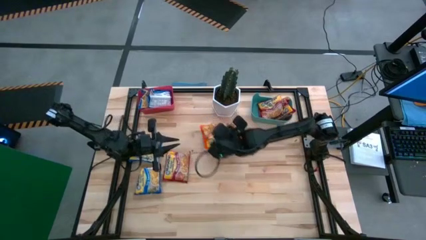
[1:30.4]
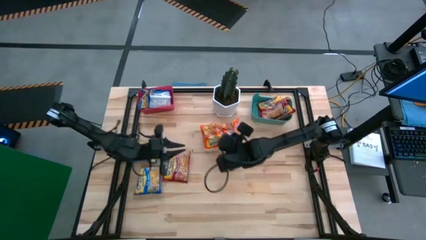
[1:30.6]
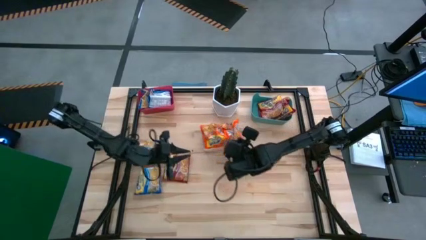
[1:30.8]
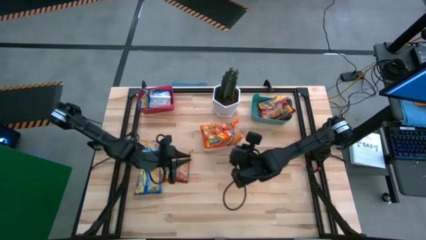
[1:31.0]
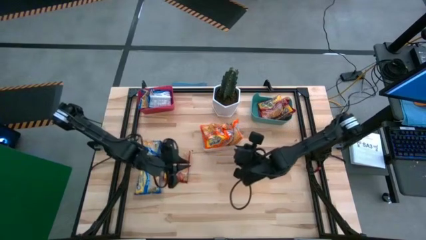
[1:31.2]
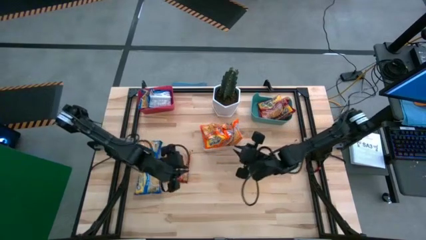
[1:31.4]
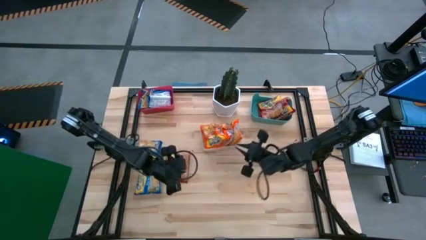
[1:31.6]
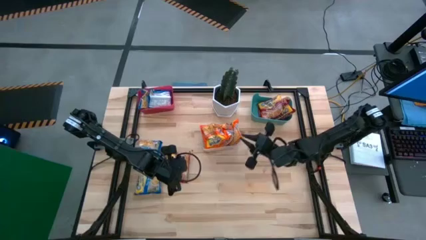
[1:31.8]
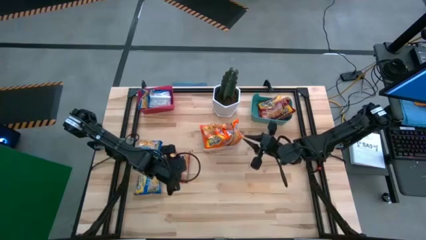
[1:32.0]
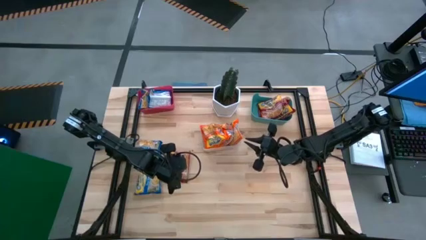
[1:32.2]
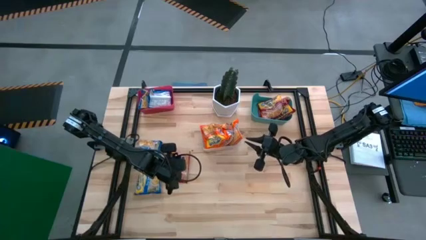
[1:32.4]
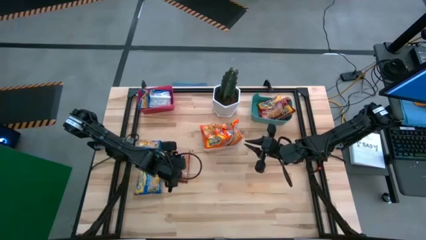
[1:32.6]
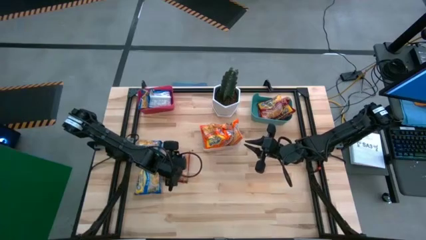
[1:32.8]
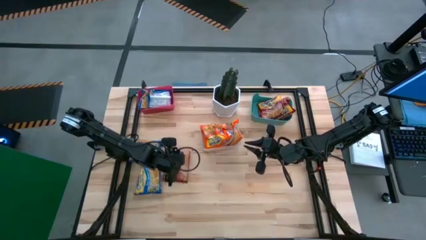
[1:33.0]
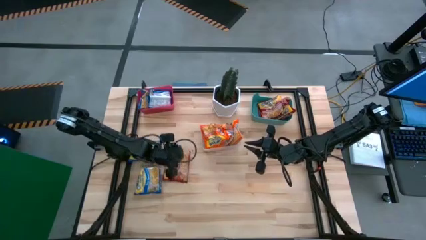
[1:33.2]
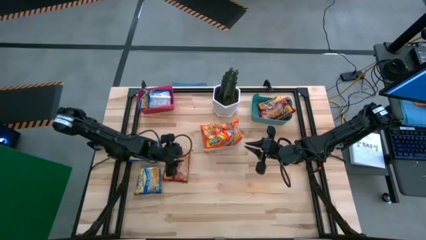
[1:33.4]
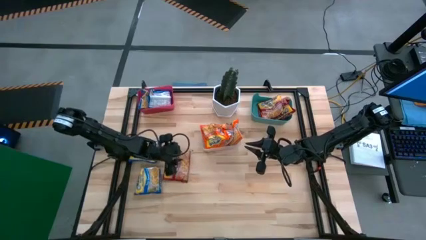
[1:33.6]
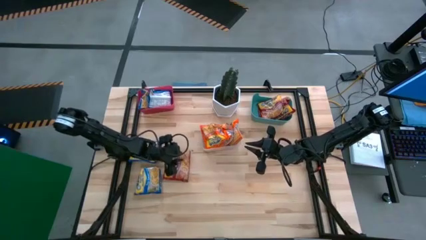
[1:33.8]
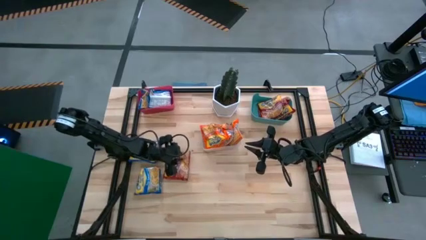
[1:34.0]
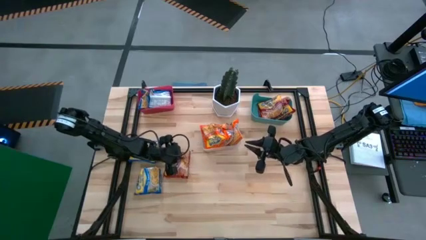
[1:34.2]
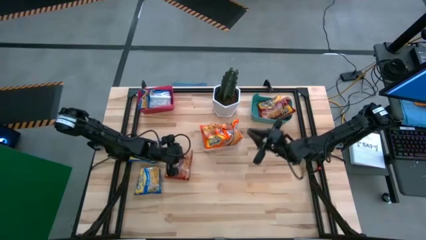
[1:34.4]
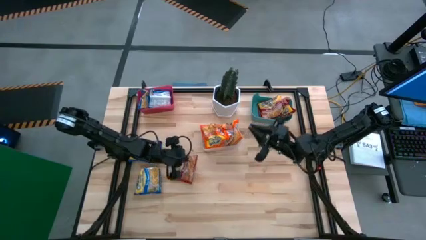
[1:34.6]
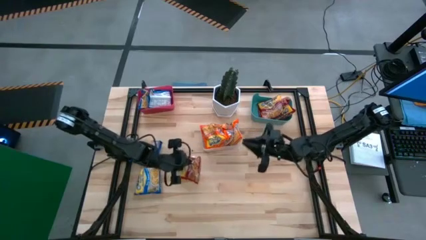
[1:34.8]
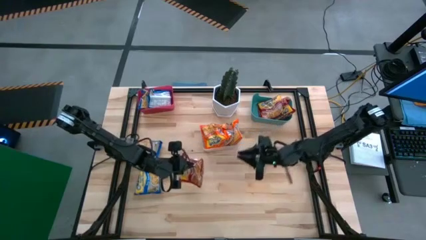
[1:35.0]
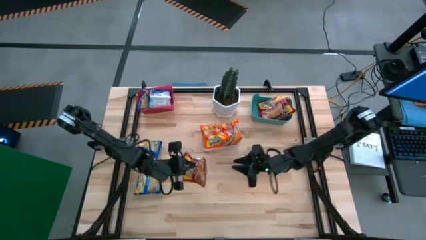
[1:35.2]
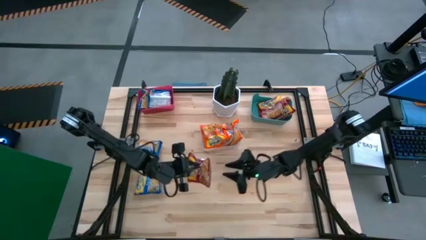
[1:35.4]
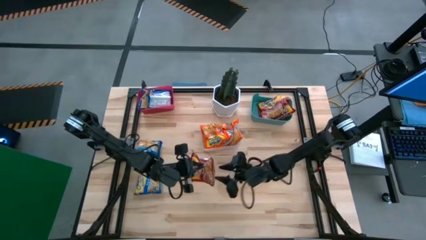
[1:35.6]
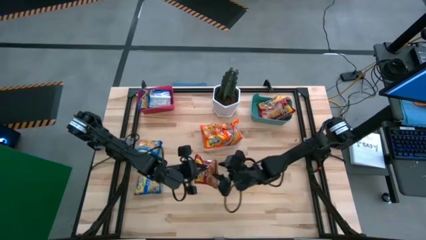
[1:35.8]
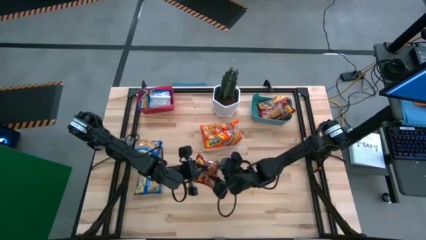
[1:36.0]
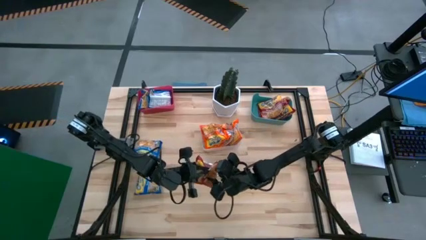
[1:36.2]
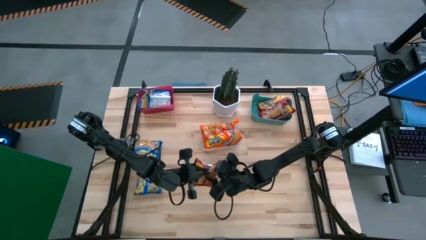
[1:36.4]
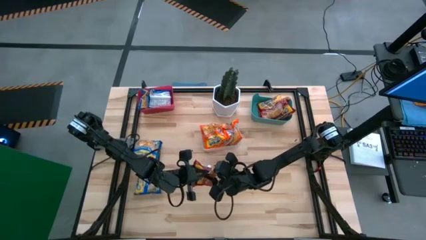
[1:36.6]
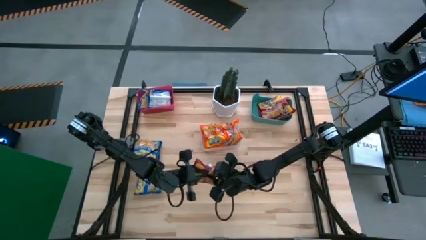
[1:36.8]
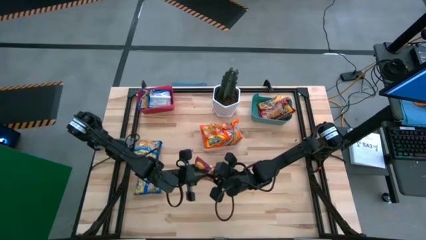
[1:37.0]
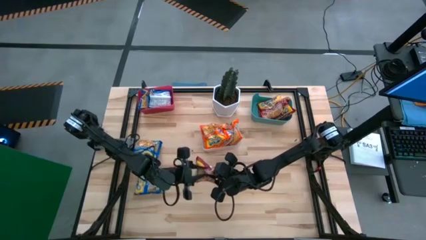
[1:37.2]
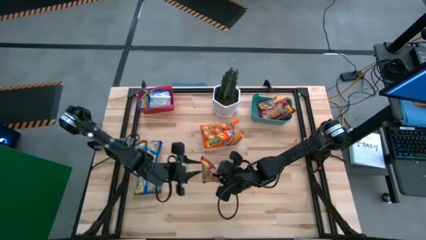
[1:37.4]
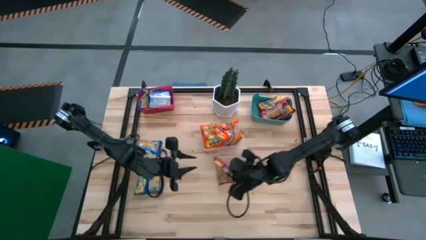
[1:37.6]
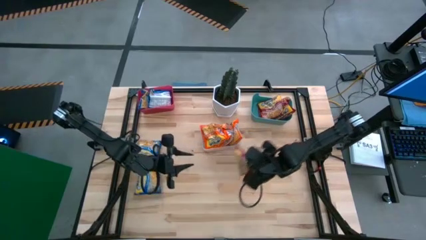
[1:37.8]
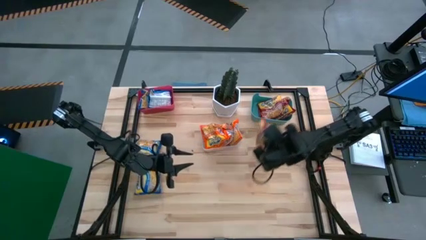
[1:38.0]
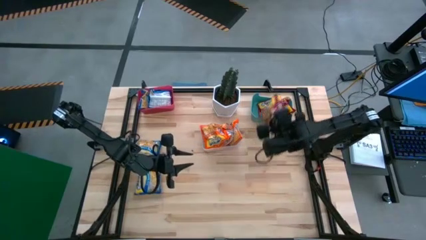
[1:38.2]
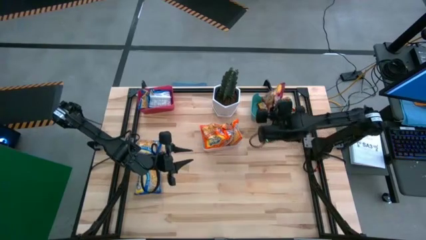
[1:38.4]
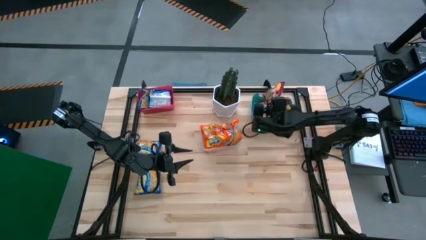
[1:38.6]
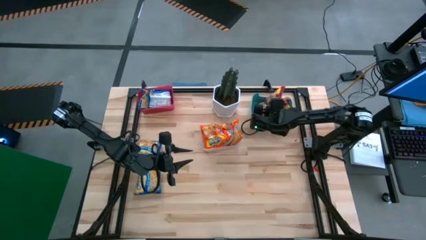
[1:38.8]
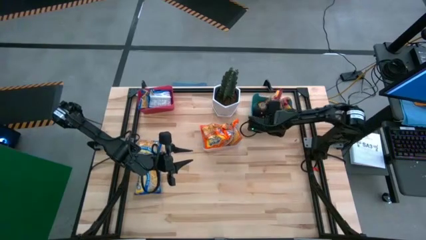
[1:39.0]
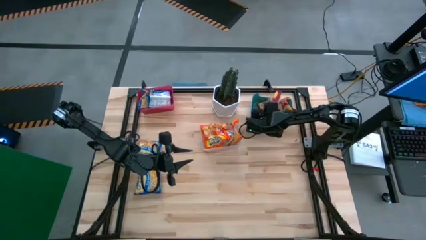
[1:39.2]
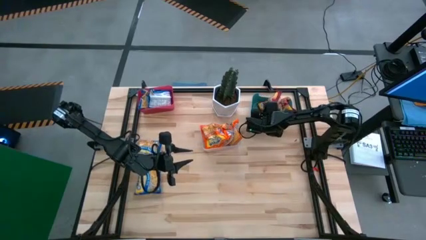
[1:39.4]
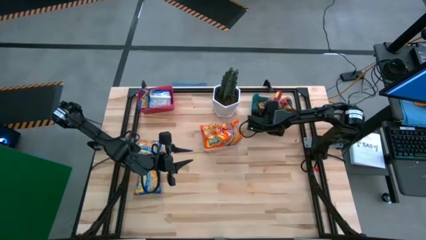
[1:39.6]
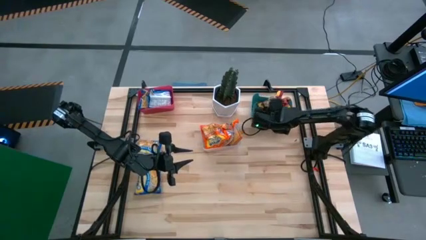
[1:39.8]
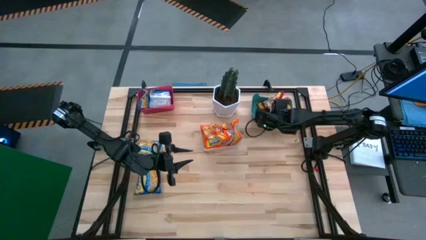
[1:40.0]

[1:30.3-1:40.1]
Task: Sort Maruchan noodles
Put the red noodle pack into the green bin

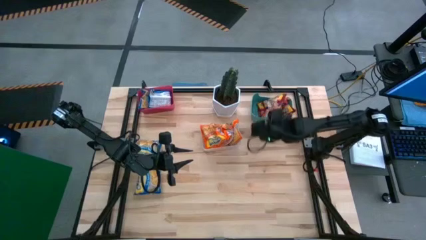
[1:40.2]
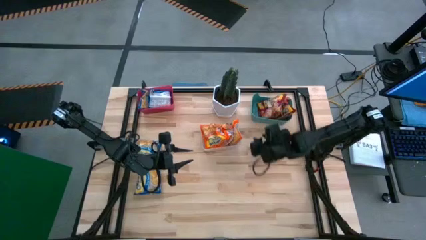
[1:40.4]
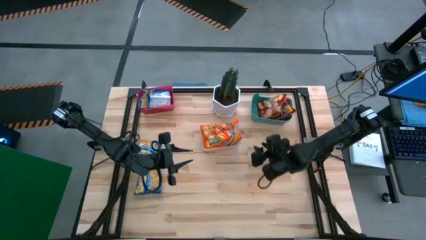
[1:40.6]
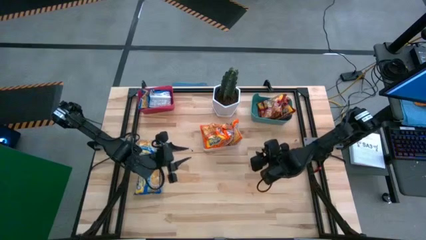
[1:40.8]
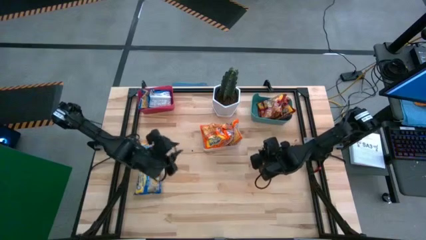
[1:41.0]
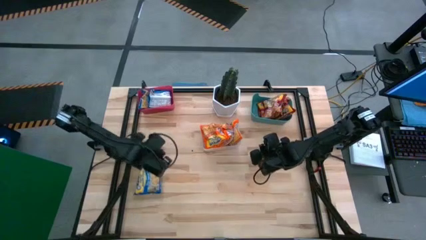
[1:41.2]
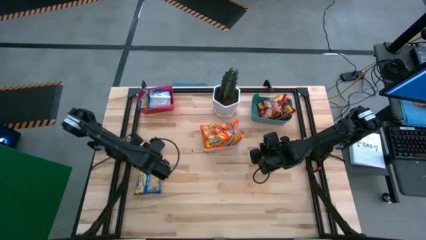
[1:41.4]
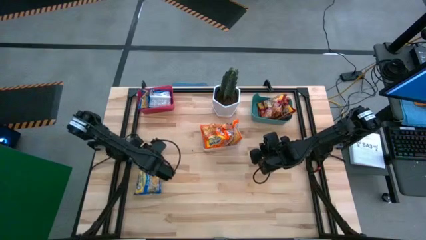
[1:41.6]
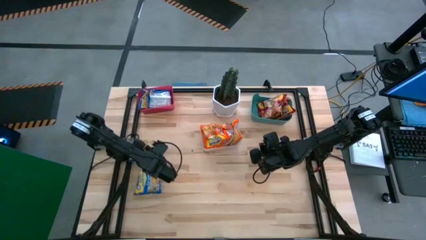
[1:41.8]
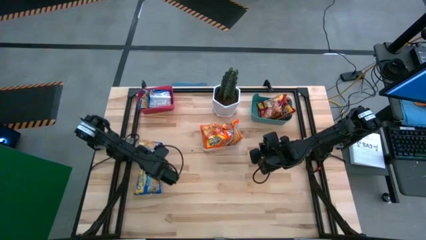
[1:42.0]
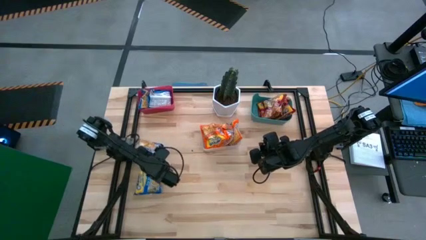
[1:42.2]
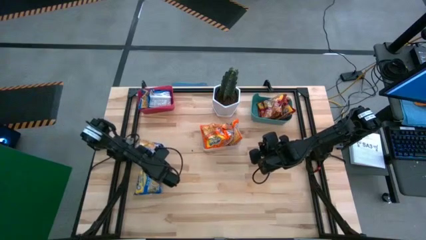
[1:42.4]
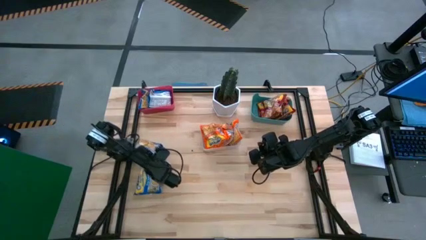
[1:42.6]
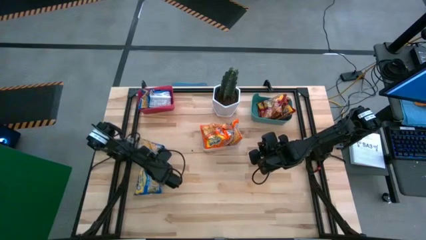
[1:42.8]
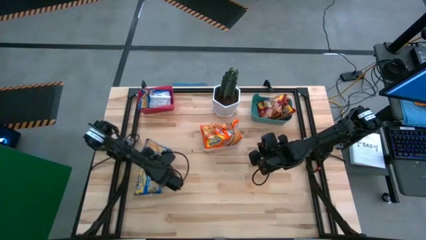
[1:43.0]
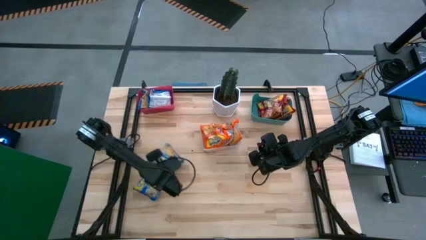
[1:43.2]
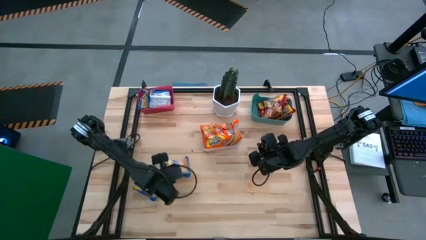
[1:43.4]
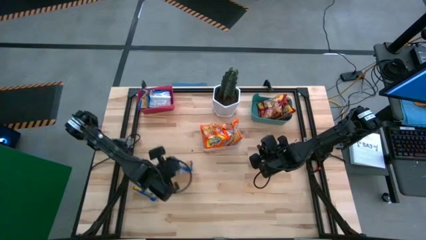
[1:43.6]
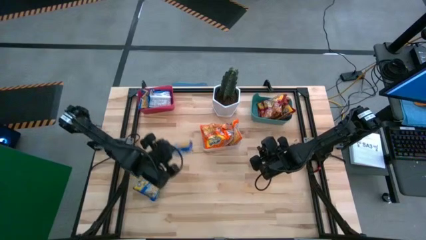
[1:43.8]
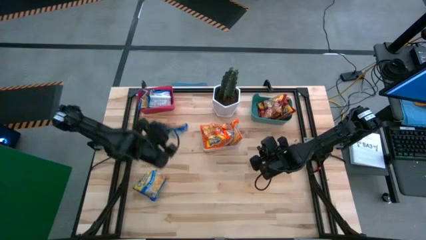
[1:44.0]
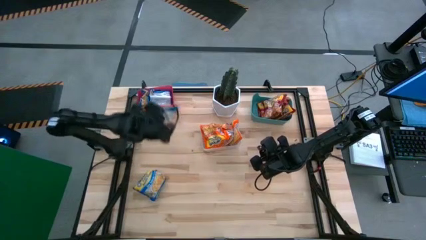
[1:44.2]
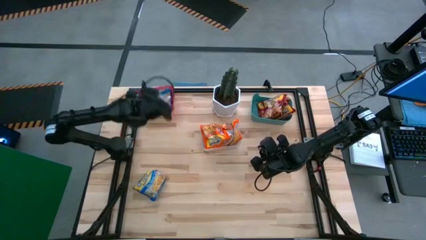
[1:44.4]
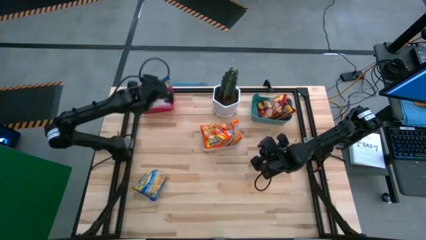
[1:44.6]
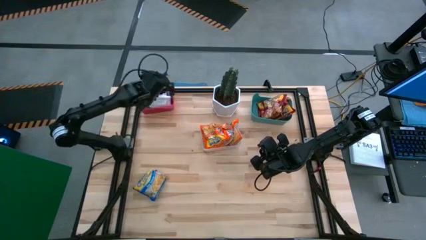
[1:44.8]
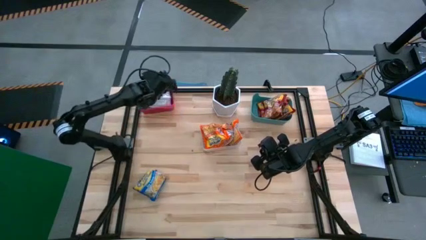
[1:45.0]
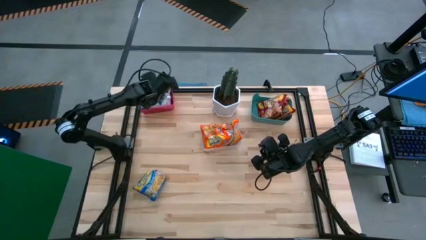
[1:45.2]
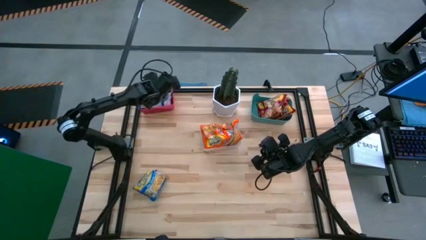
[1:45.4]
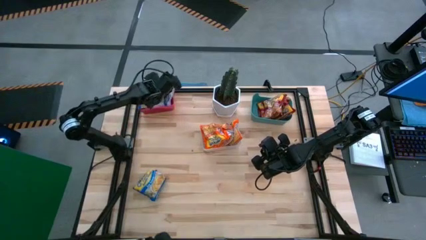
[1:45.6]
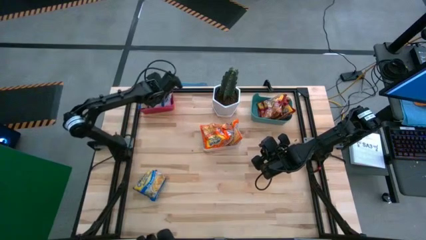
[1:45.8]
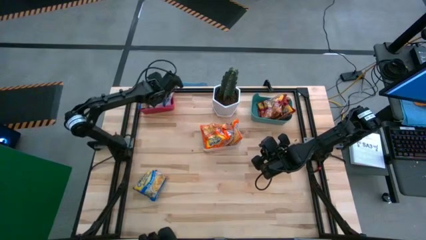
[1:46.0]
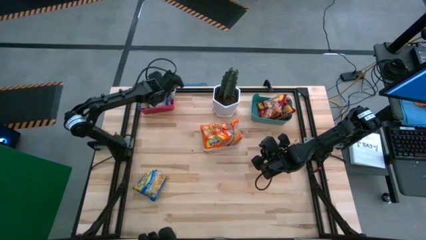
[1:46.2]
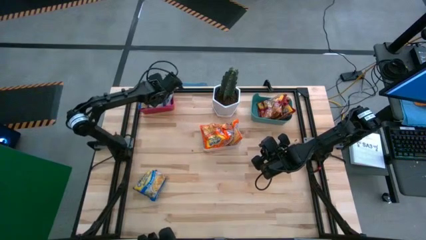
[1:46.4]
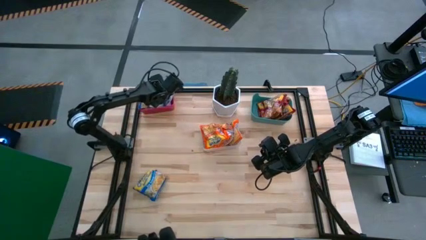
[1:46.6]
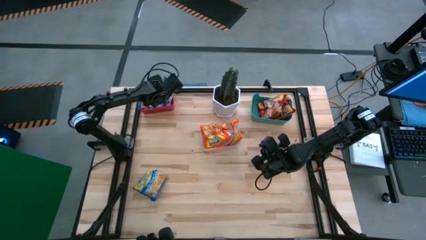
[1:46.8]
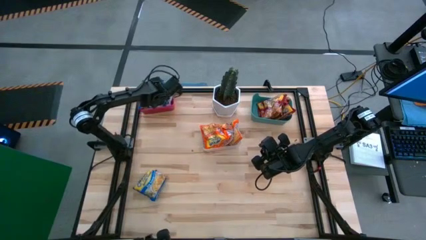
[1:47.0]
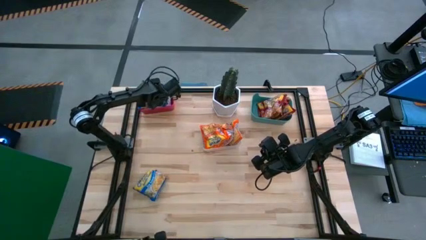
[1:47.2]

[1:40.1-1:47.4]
Put the blue noodle pack into the red bin

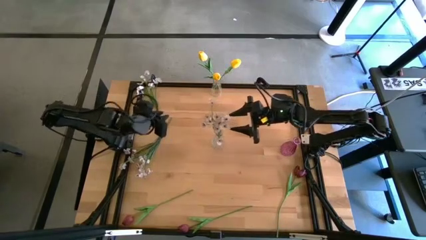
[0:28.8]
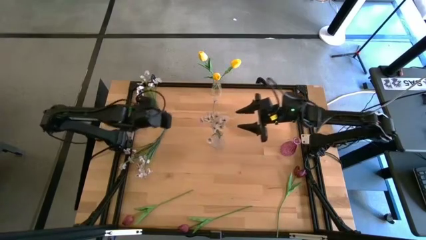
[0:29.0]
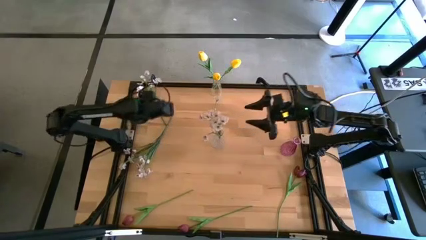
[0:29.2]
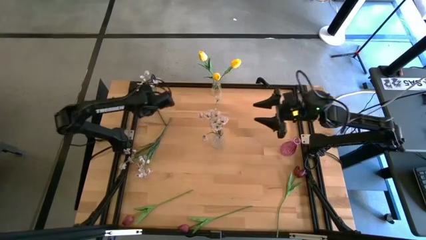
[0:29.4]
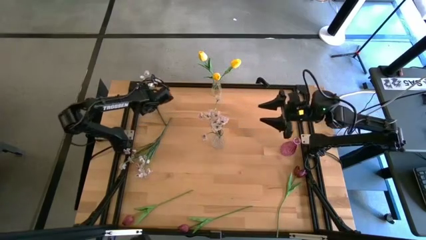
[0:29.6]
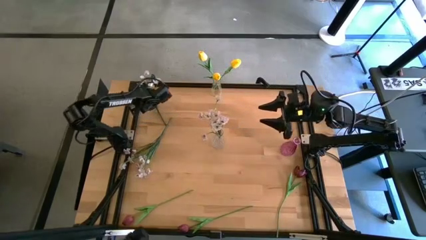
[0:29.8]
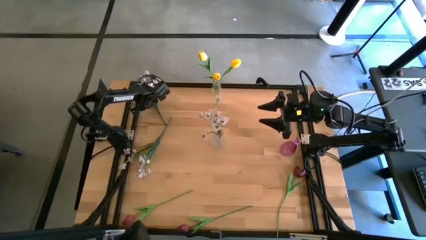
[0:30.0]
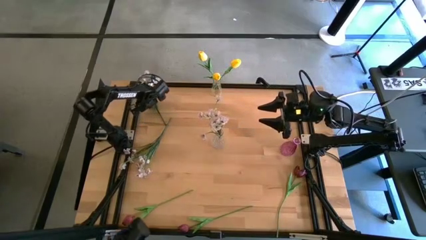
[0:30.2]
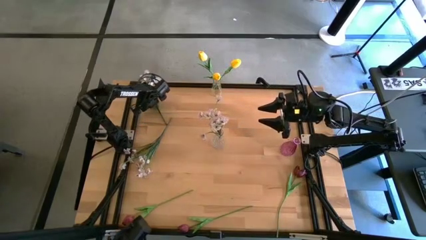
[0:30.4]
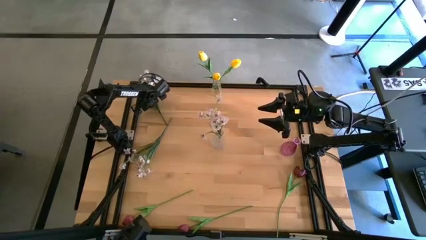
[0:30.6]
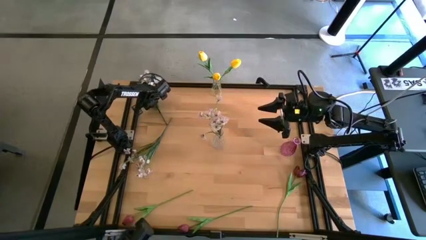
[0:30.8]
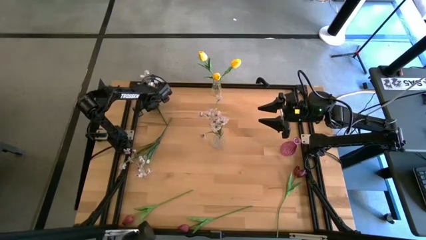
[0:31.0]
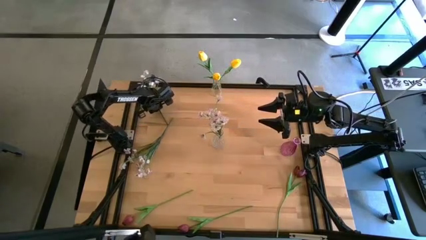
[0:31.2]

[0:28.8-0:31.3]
Task: Sort flowers into vase by color
Put the top white flower into the bottom vase
